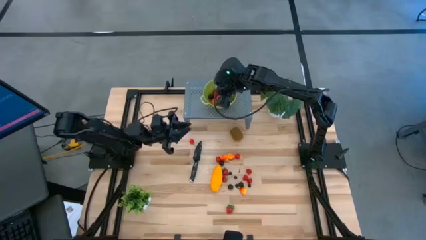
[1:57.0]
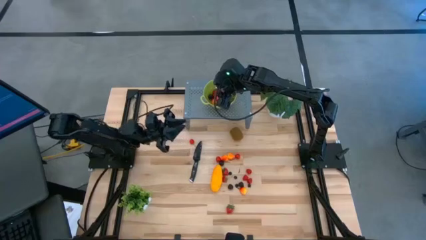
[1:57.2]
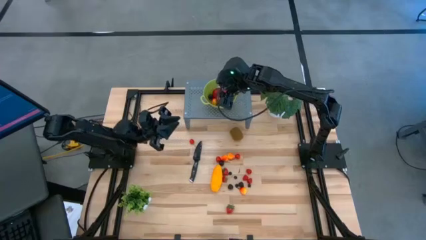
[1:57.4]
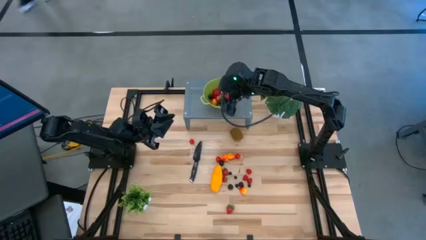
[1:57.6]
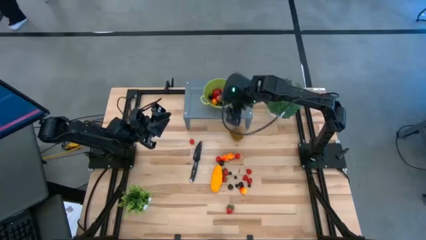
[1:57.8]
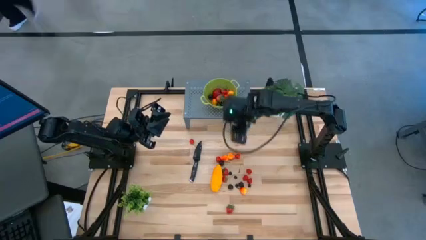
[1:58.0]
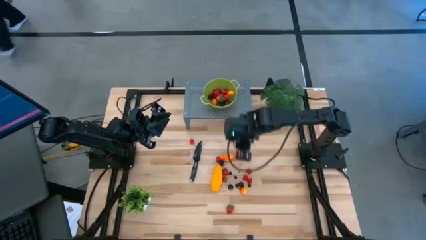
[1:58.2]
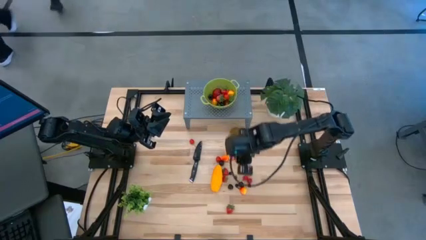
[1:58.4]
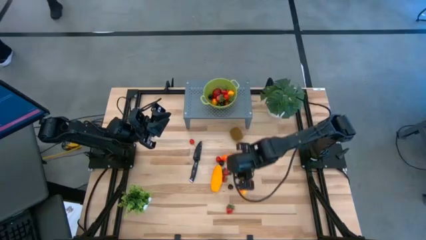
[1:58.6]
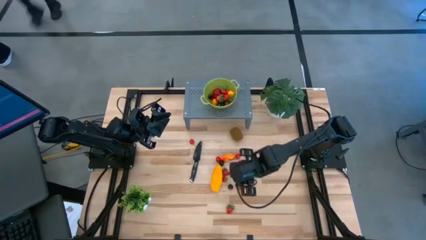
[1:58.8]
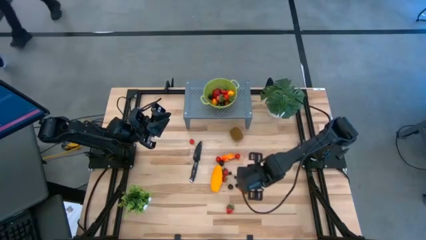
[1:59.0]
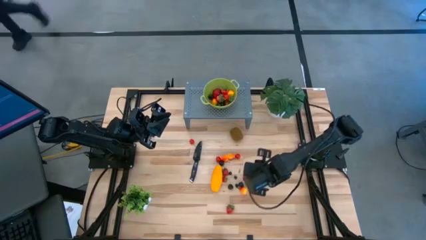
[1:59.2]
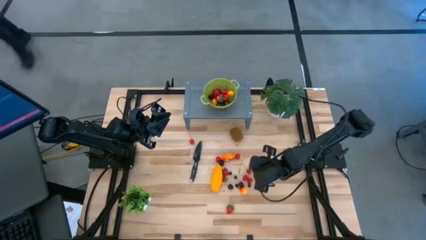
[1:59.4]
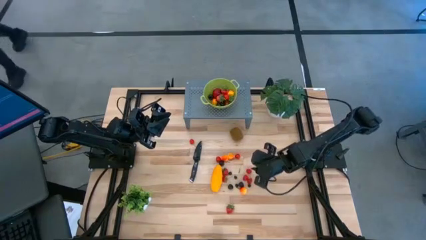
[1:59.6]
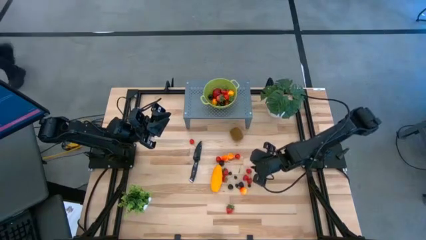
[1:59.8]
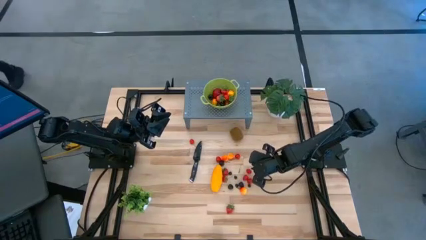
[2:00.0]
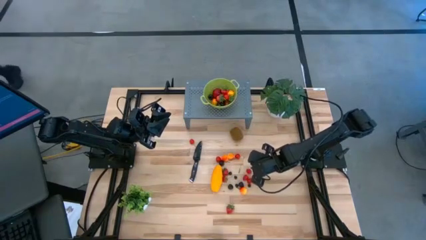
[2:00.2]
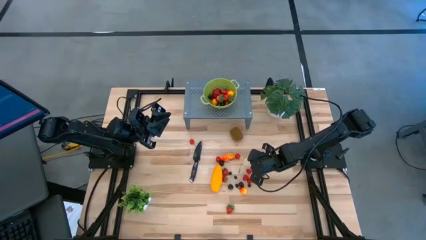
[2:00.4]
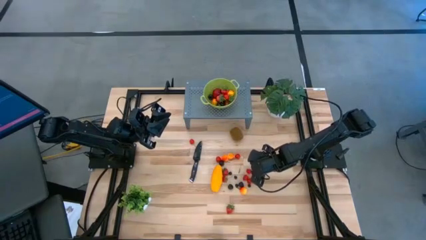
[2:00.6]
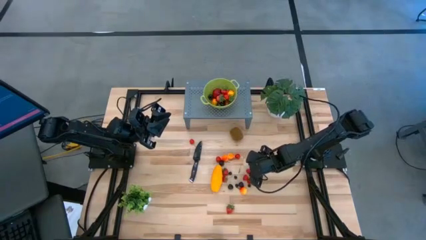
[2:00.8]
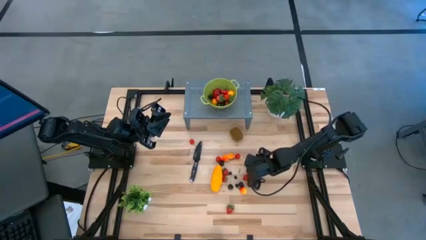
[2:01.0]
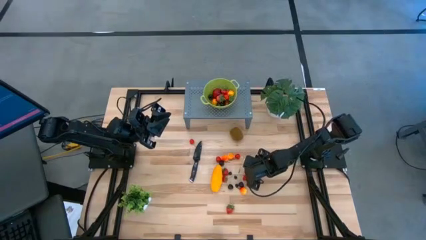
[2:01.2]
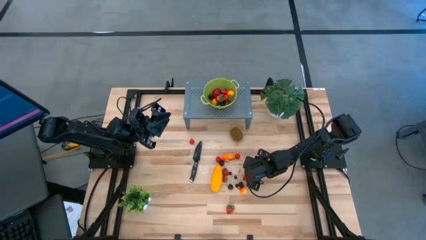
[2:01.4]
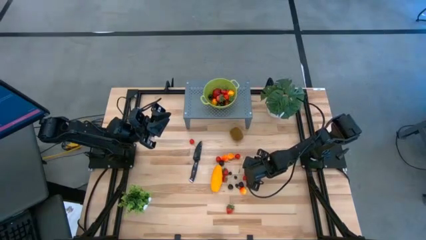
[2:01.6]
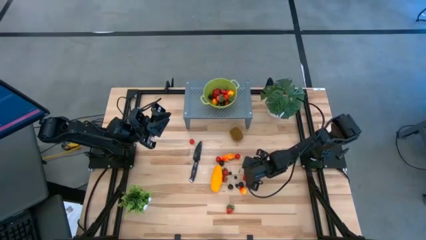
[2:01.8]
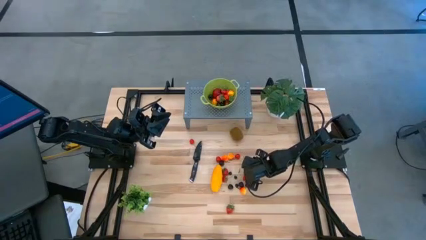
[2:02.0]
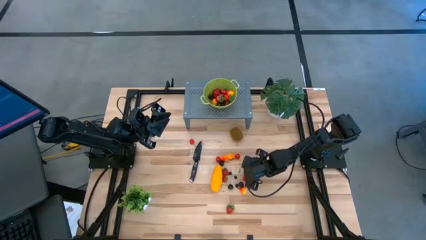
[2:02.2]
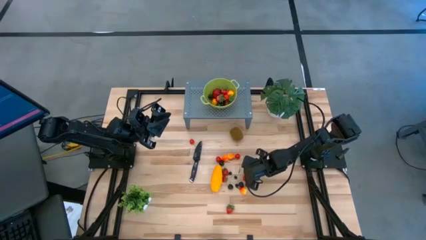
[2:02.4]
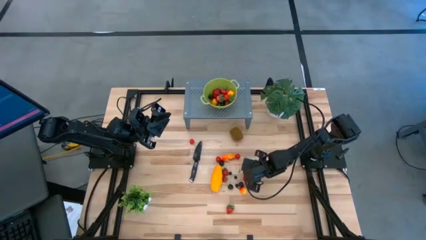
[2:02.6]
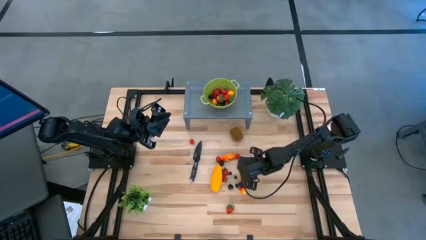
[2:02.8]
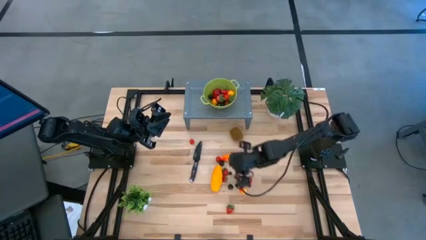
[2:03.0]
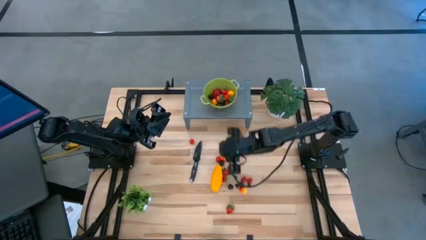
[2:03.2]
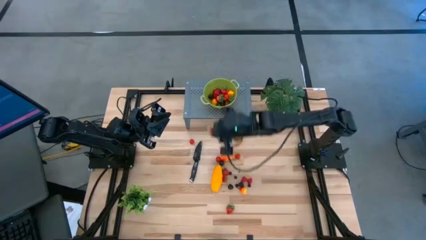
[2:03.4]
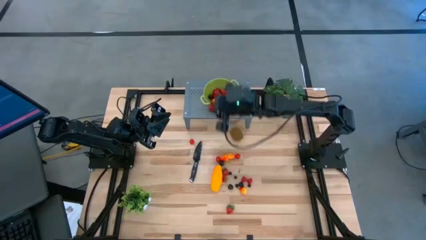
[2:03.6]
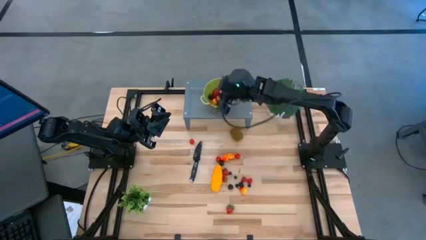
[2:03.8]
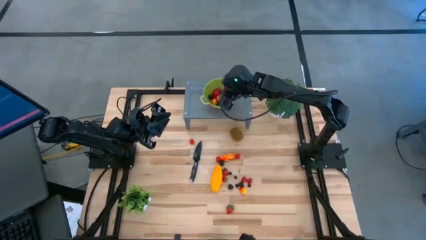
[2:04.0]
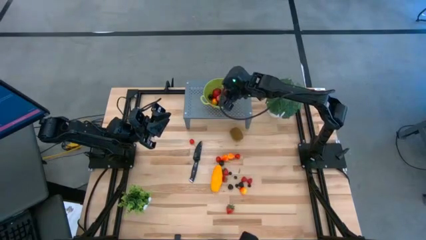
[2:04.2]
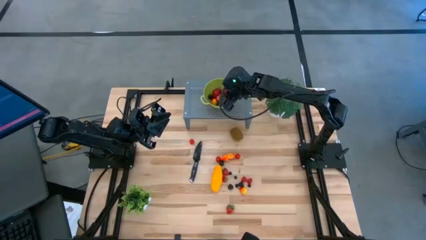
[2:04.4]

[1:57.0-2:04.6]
Task: Pick & Place Fruit
Put the raspberry into the green strainer bowl on the shelf

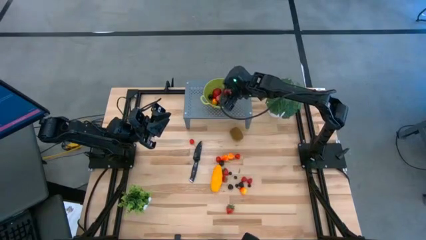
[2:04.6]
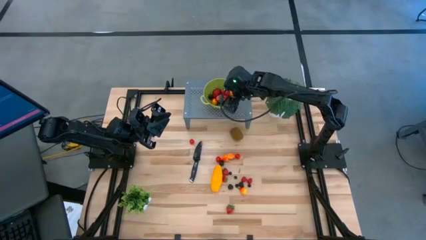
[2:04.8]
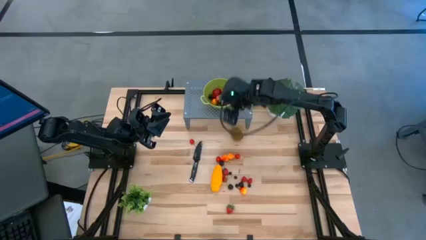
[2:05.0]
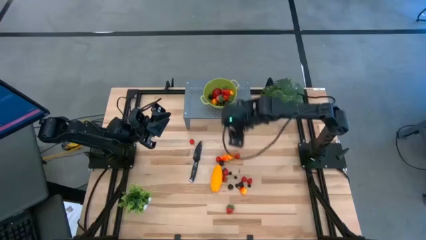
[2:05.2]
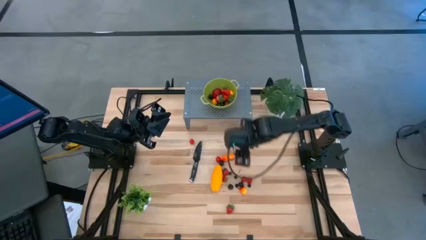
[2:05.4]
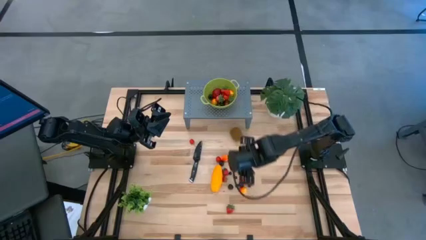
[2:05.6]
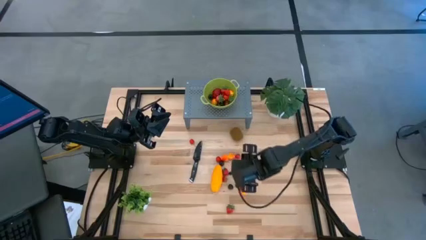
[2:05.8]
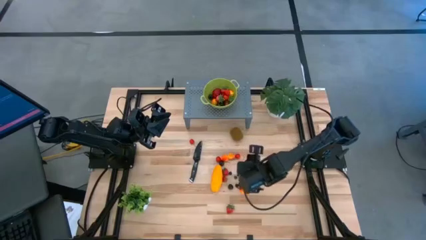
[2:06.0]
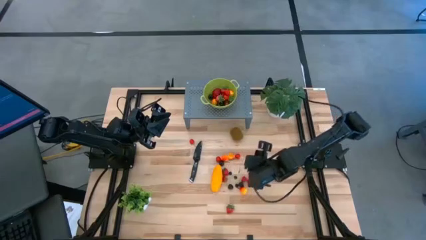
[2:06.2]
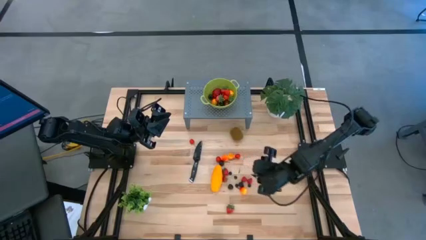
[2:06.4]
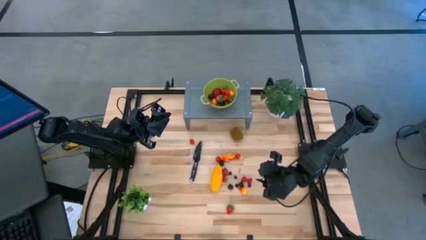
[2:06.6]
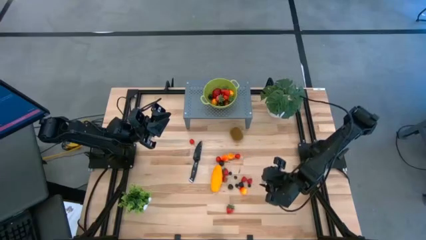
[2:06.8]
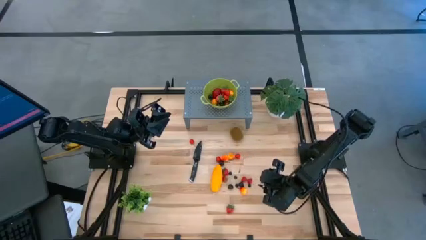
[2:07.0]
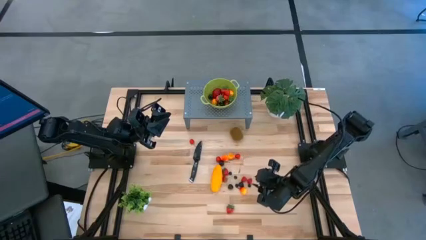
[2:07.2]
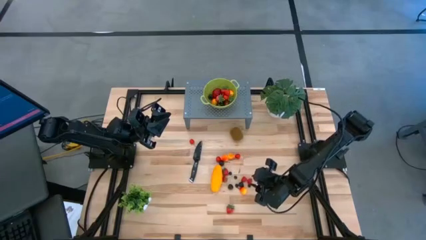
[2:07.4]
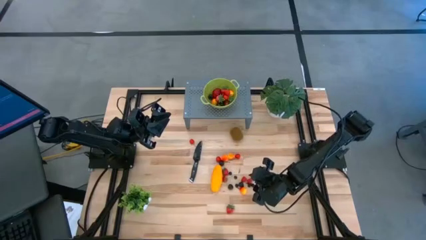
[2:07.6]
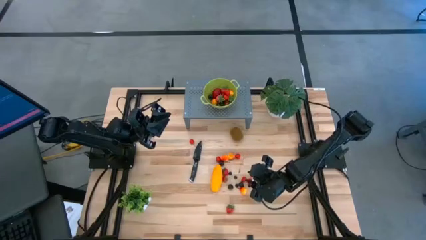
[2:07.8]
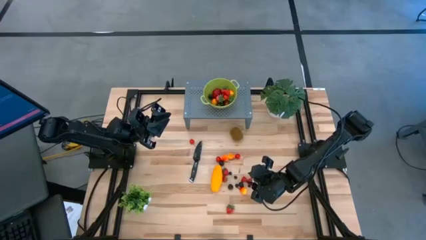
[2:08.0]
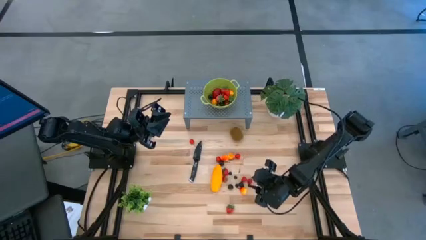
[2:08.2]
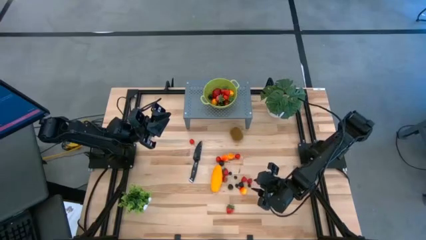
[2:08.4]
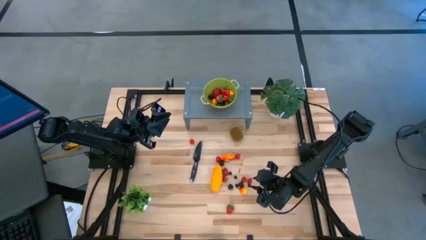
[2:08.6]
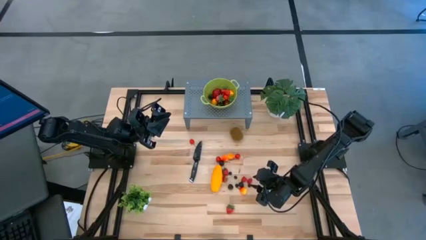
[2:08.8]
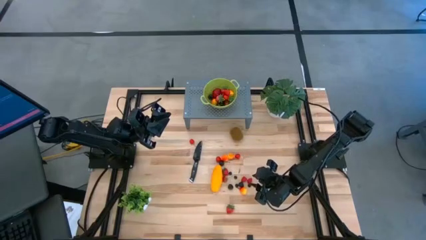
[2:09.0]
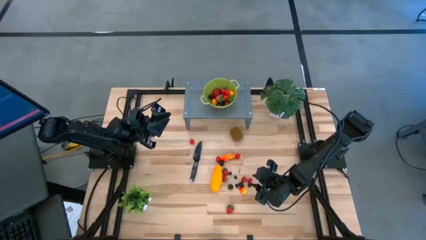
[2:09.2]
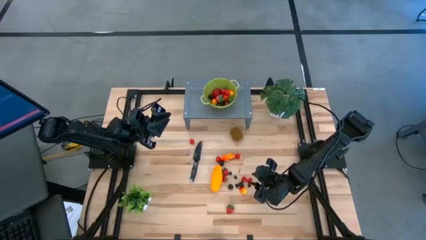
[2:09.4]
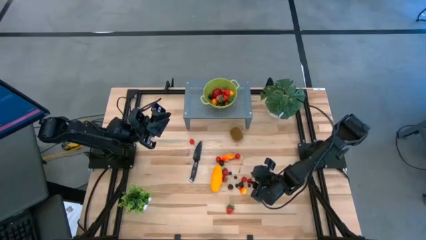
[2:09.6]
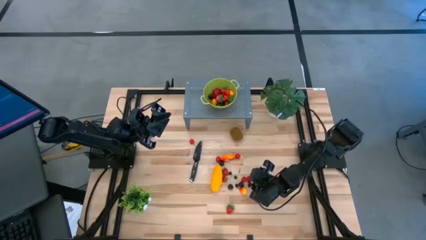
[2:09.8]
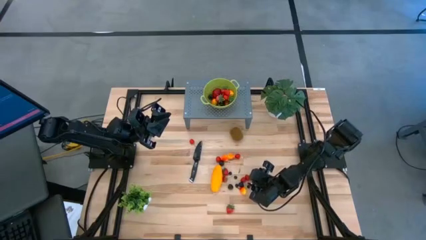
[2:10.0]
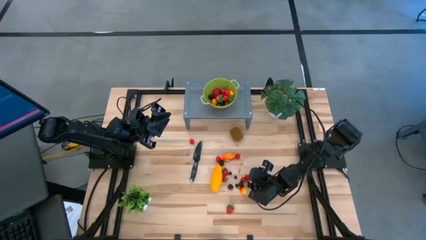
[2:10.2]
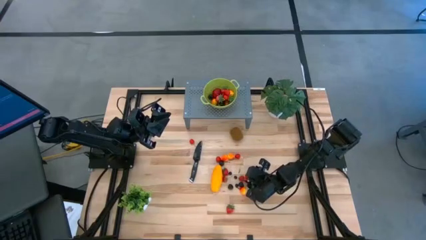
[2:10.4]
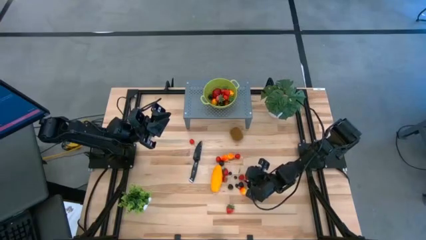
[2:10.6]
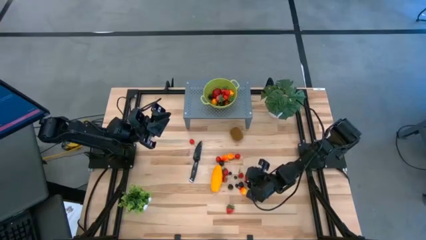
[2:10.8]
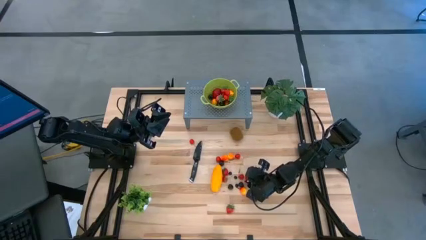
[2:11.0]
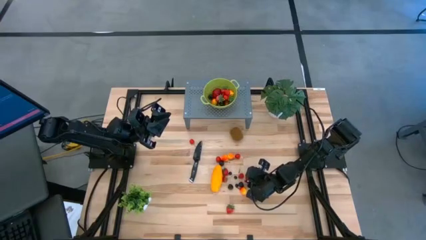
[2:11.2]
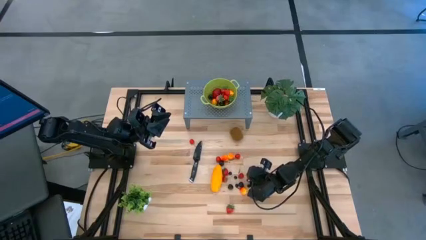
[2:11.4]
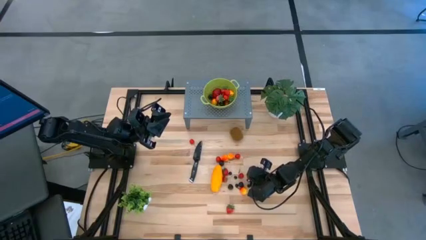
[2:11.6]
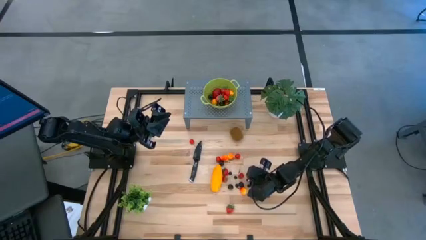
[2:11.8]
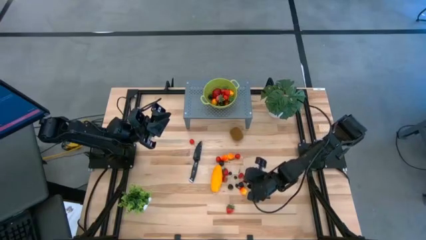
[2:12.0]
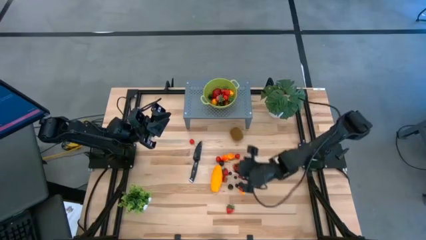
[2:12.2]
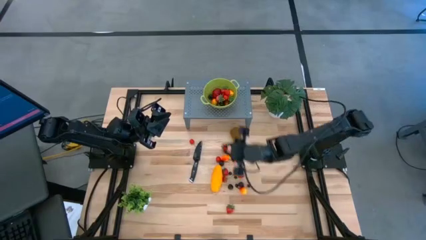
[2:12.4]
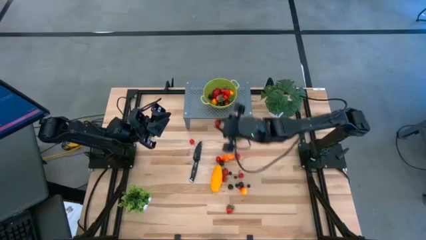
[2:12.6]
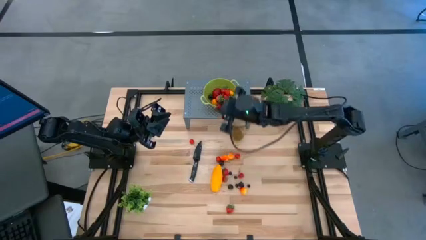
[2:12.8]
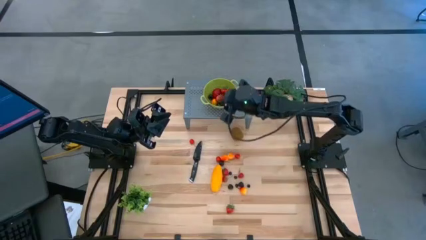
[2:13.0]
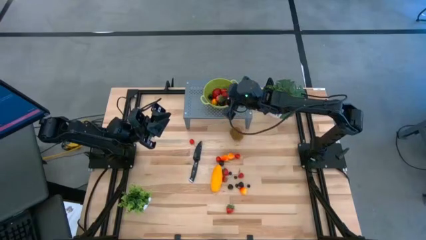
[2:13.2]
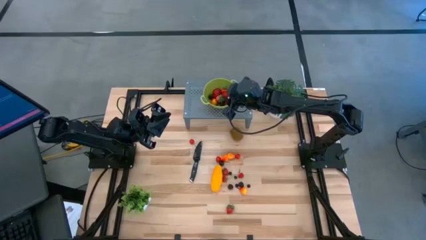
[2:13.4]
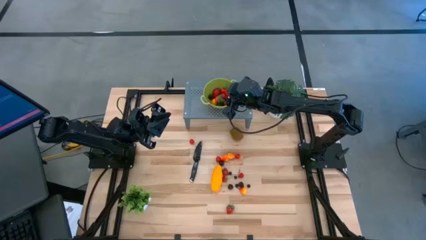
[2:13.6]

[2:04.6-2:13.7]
Put the raspberry into the green strainer bowl on the shelf
